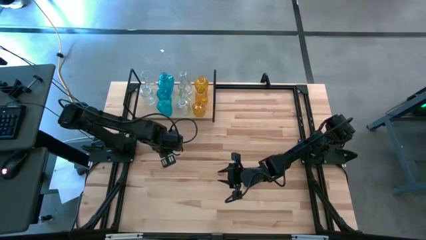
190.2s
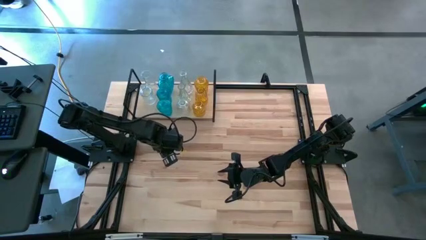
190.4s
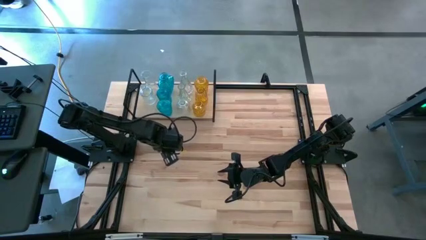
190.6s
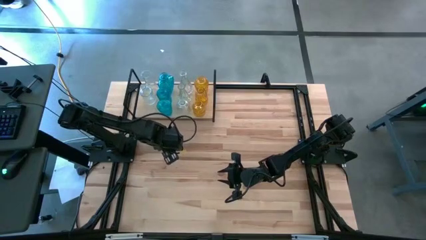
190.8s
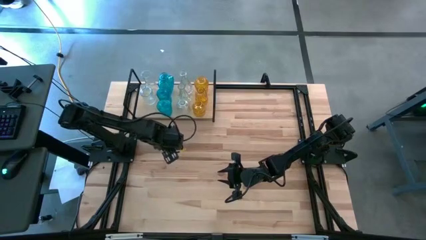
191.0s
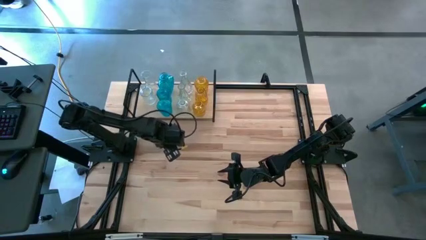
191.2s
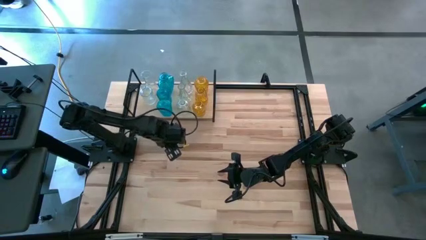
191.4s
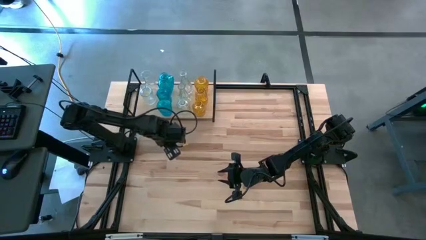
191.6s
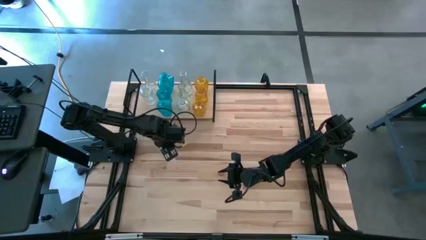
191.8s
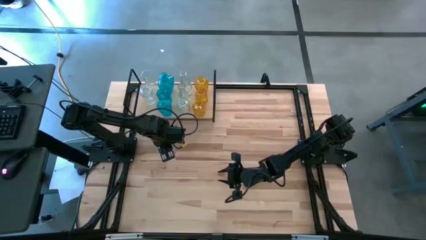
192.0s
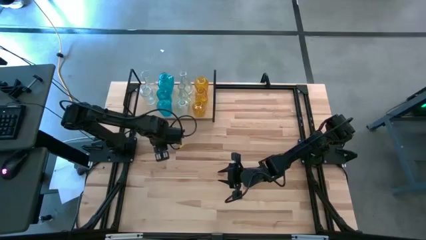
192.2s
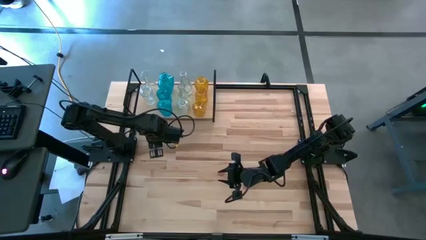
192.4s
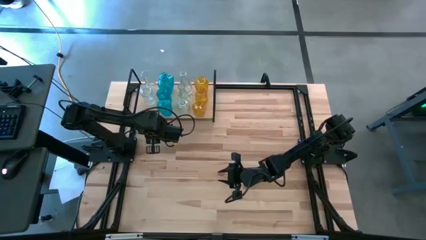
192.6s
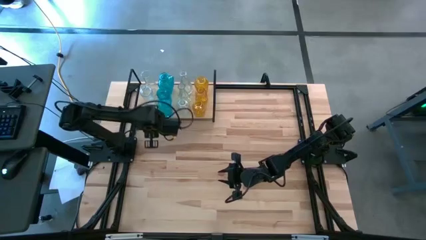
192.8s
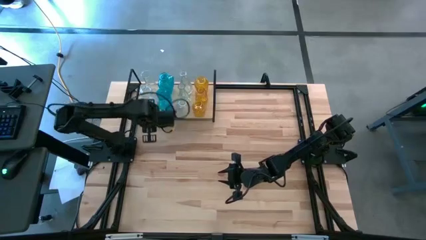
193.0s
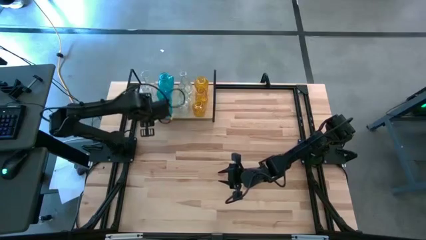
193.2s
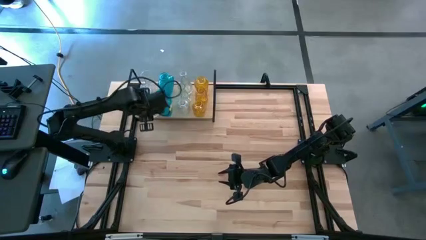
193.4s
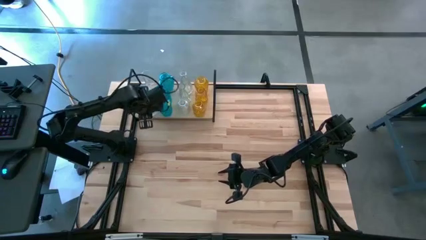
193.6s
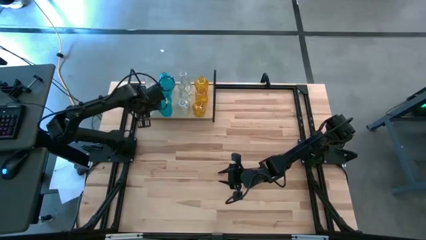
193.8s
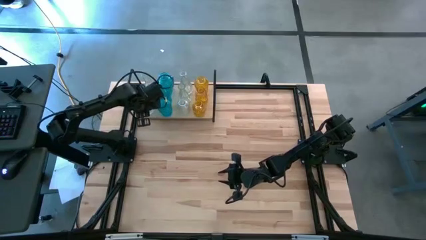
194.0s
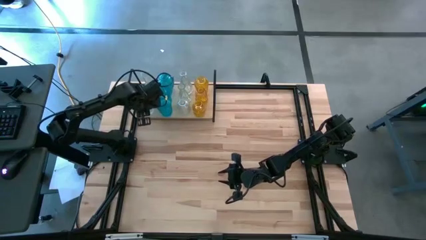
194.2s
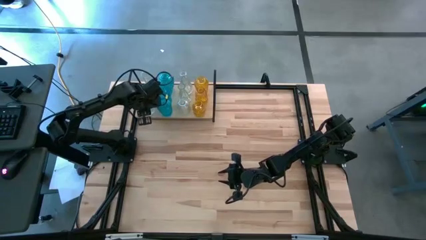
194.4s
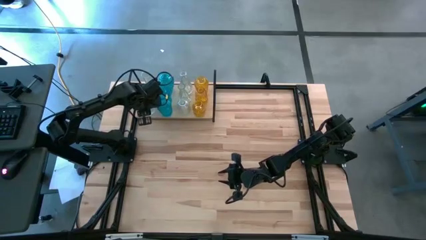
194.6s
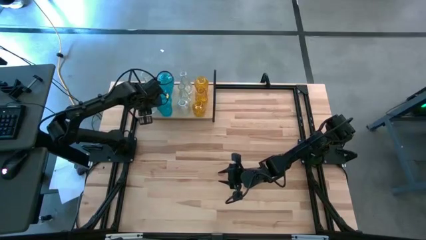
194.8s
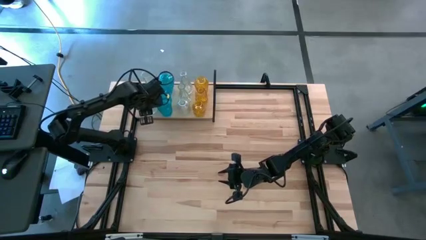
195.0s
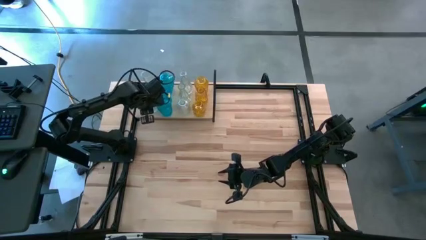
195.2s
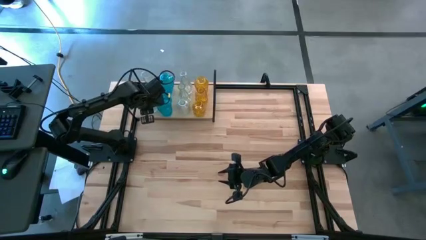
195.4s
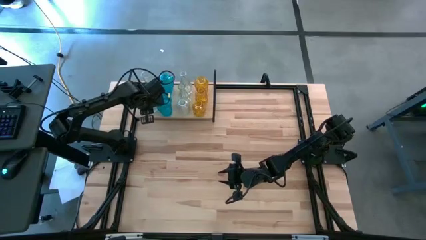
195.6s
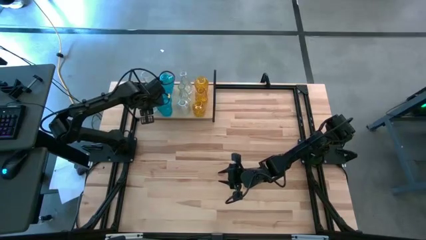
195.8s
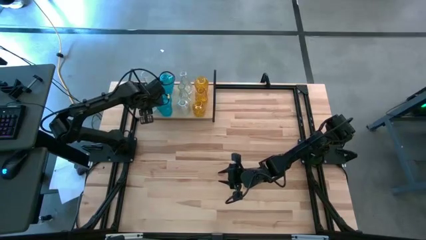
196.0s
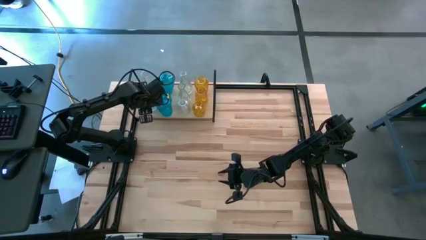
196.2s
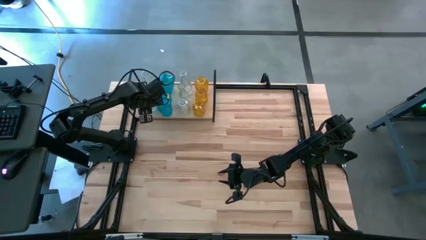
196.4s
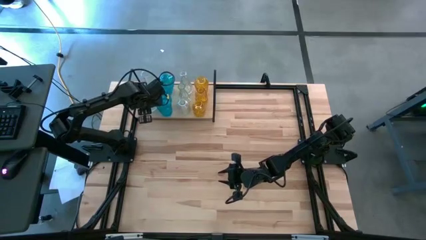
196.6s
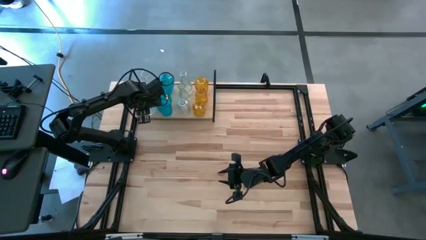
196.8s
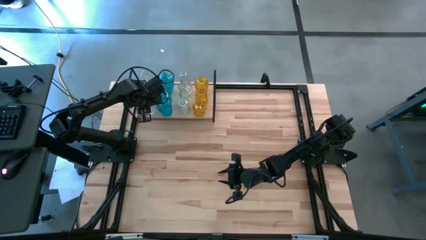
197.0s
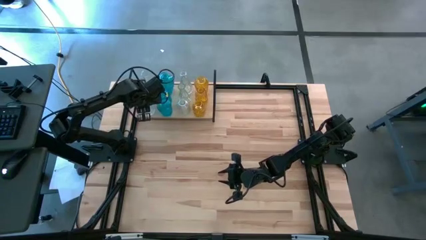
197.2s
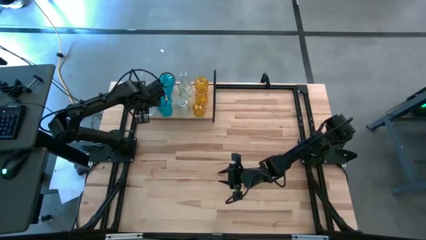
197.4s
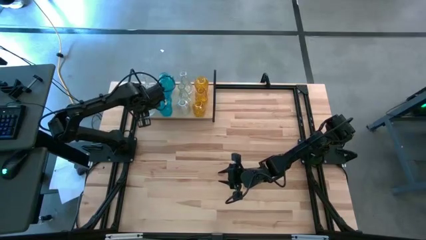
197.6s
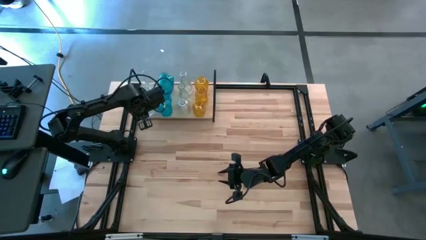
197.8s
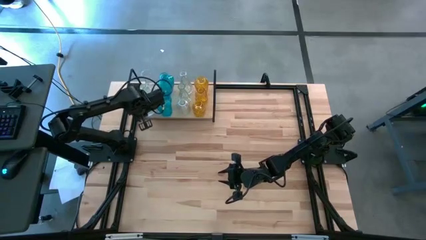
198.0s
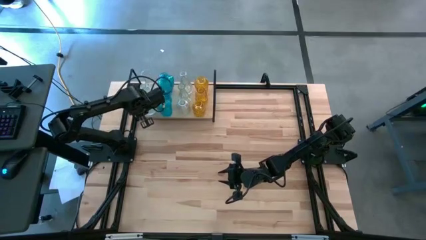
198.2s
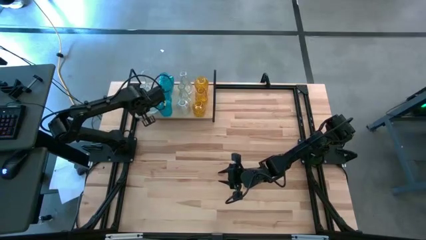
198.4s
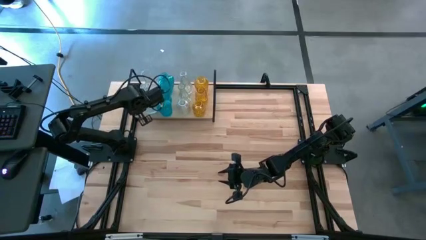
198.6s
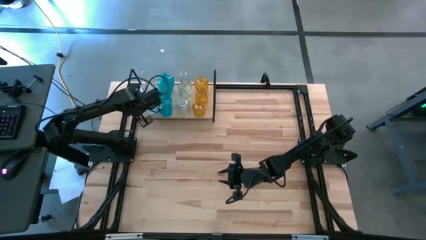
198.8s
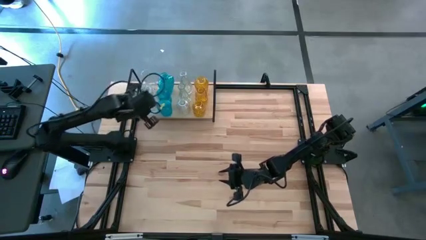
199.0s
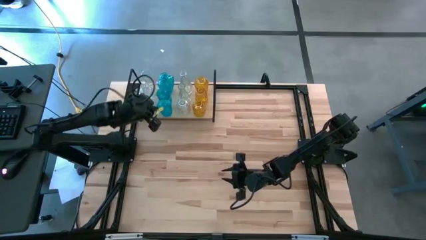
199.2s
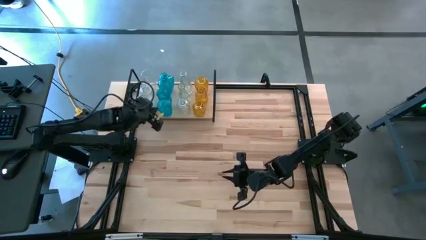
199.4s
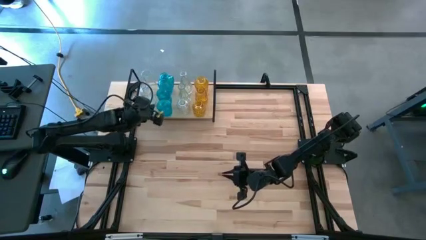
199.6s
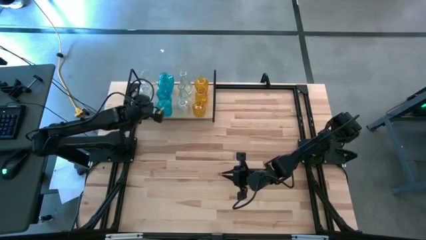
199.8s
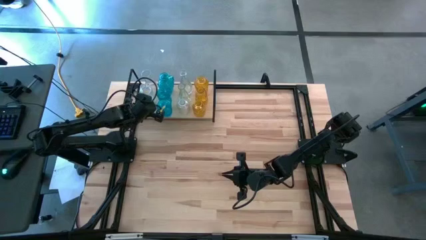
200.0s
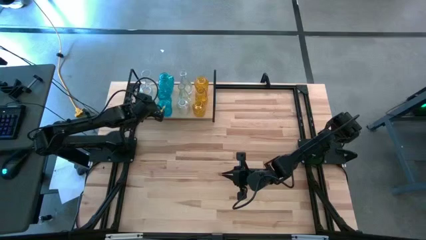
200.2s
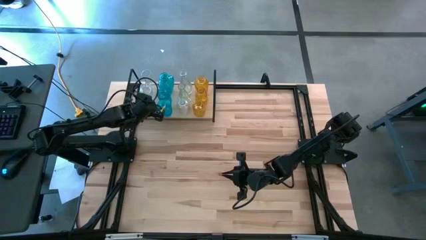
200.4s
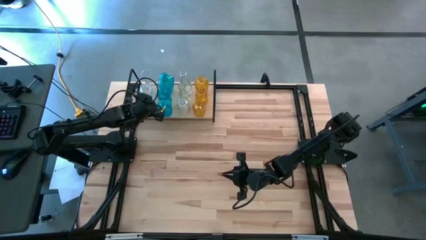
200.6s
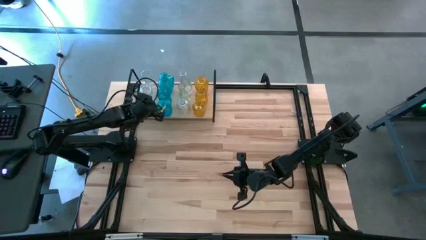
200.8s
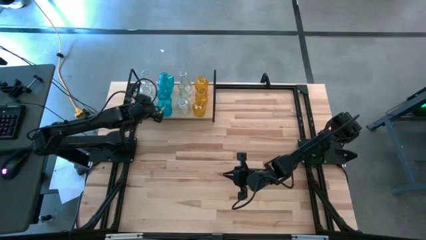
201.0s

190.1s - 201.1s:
Task: sort vases onto shelf
Put the transparent vase on the shelf aligned with the other transparent vase

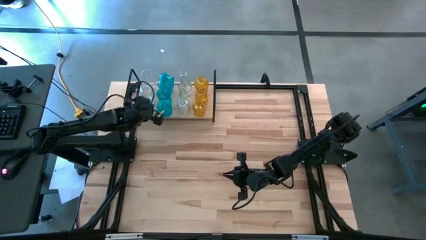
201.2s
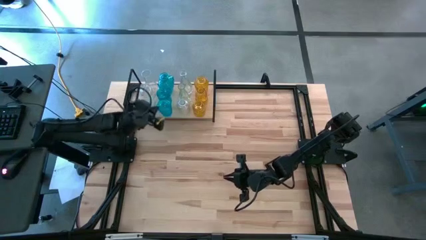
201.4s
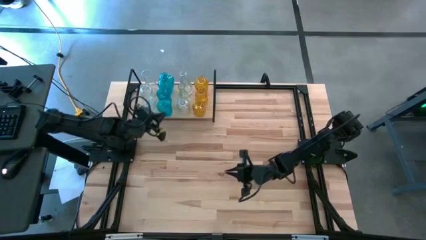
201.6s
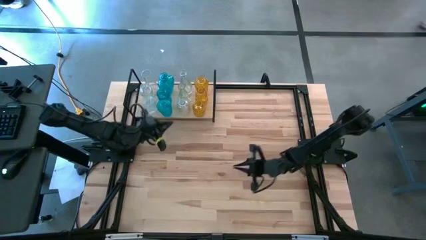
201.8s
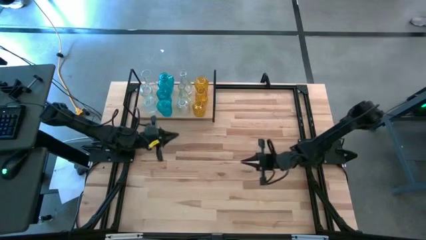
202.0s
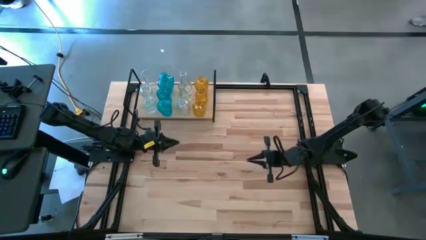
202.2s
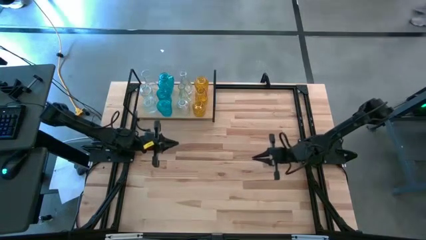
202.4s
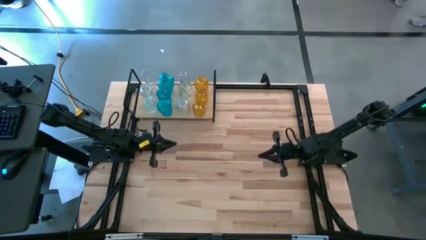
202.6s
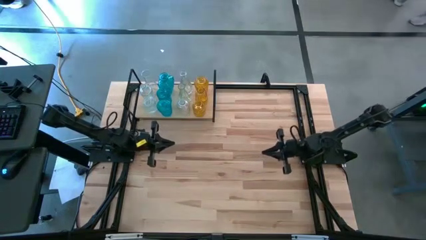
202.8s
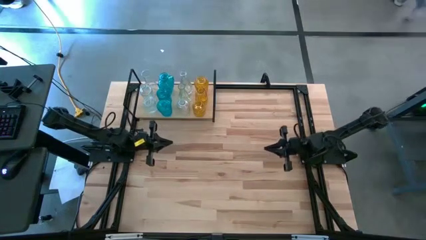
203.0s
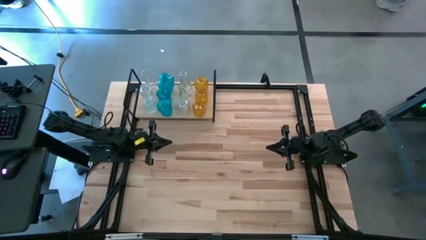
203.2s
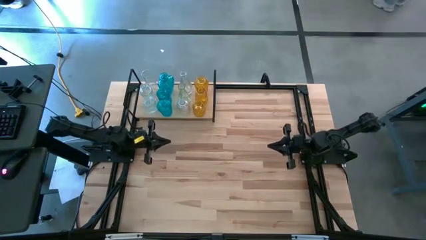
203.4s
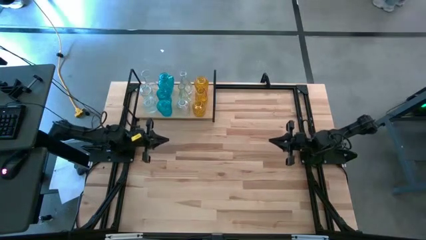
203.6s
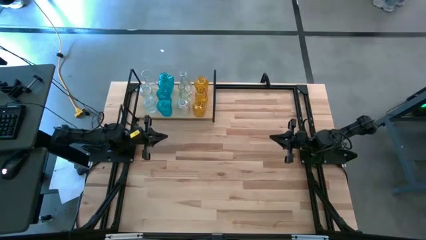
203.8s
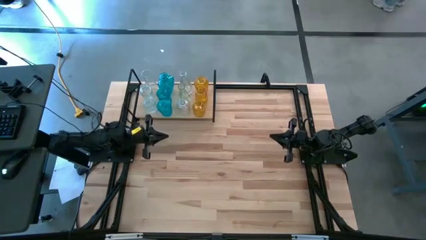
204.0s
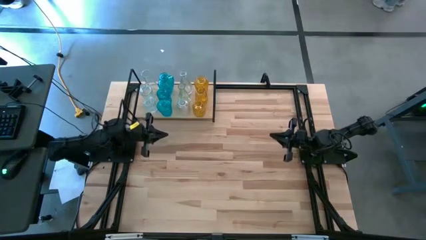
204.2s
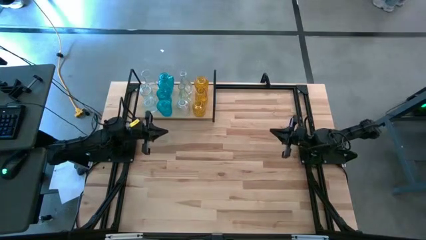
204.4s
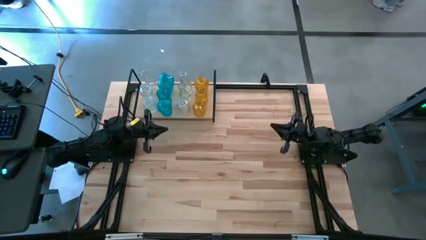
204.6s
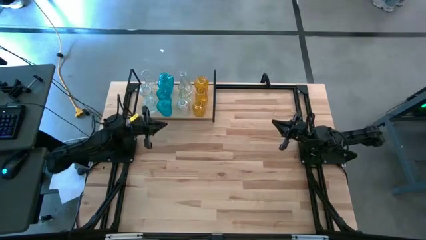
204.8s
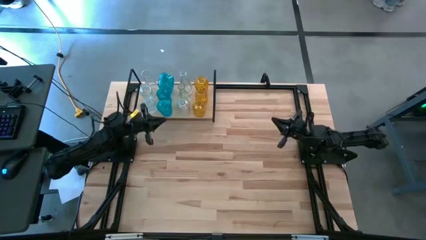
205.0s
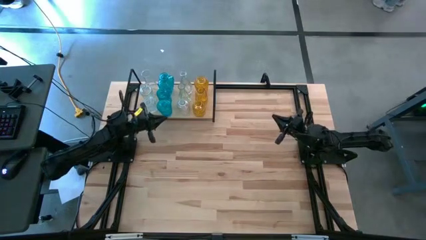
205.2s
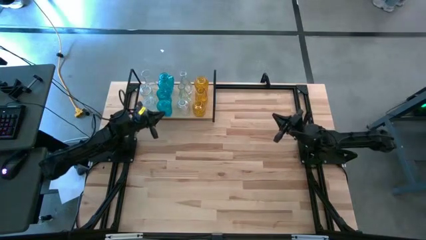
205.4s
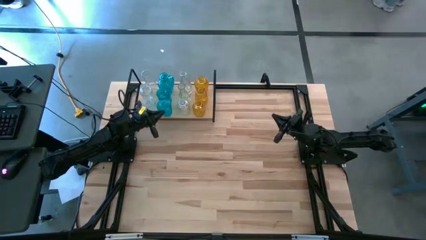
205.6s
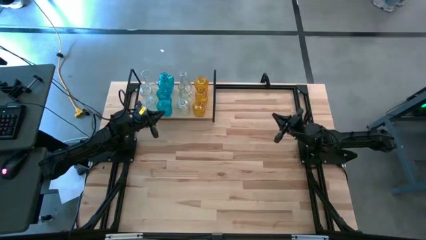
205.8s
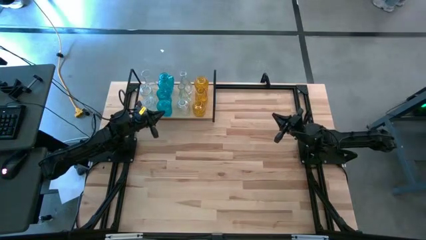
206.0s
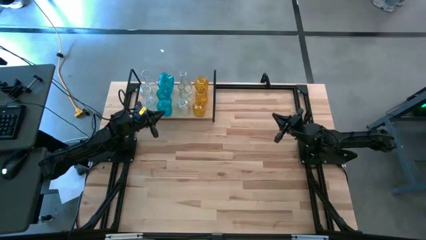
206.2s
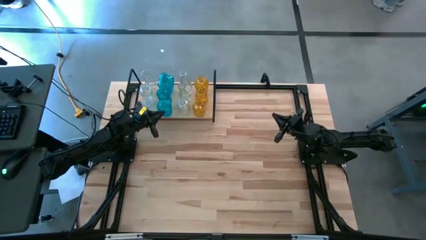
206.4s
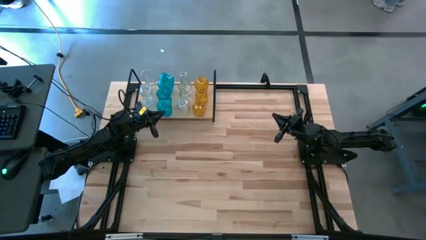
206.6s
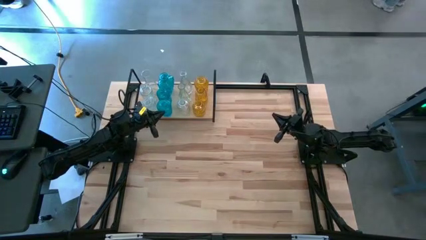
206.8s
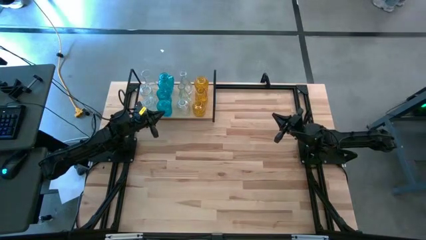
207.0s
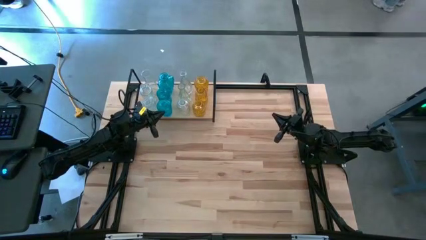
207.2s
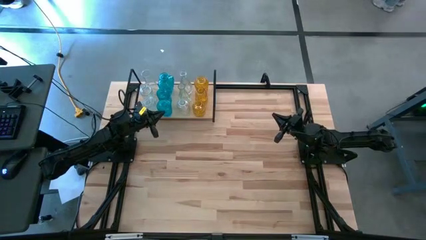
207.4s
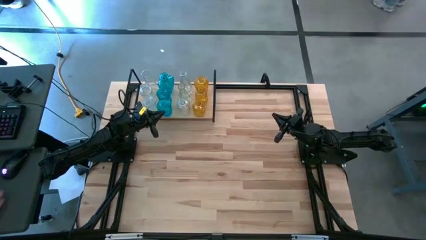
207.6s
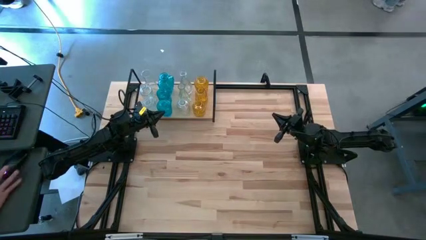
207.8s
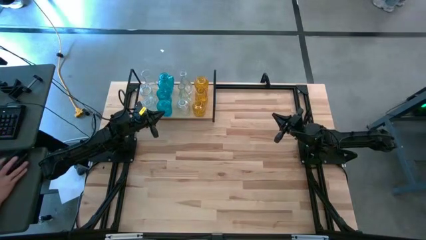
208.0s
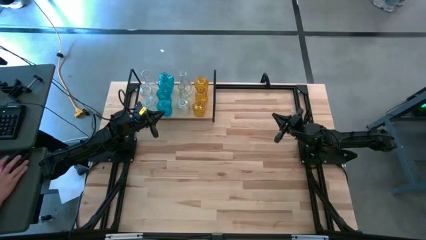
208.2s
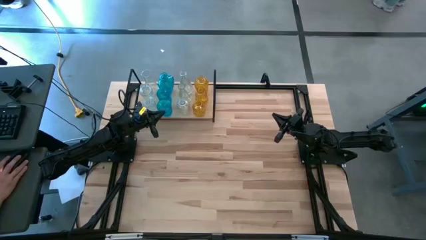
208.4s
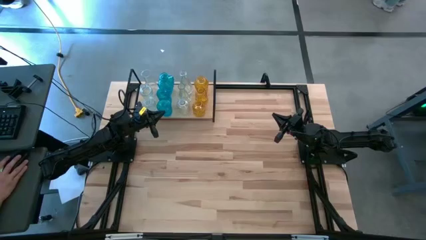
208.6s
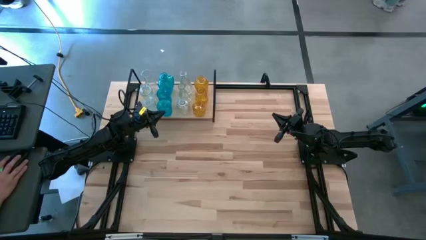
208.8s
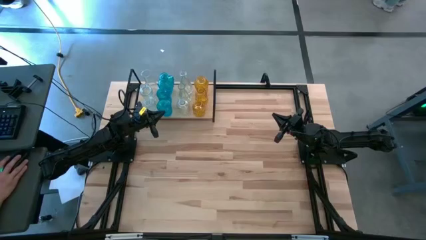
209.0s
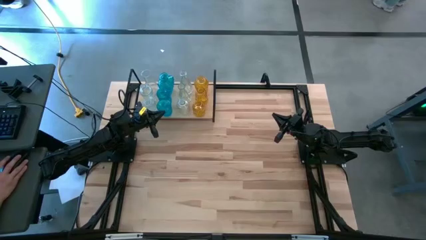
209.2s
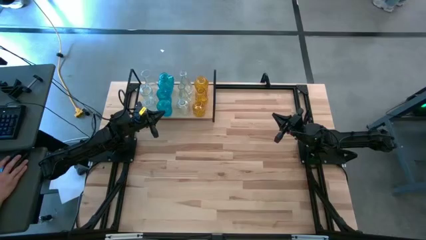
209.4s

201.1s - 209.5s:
Return to Home Position
